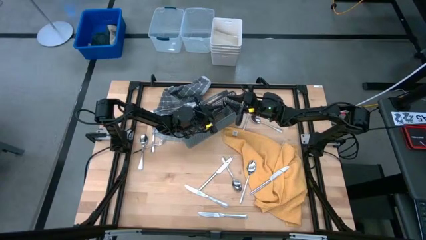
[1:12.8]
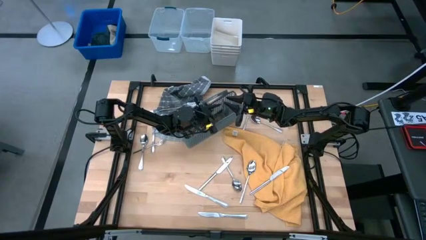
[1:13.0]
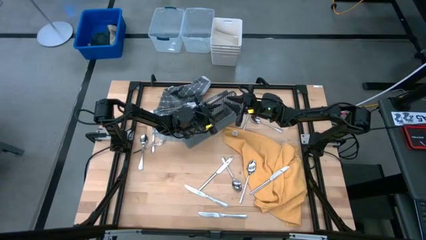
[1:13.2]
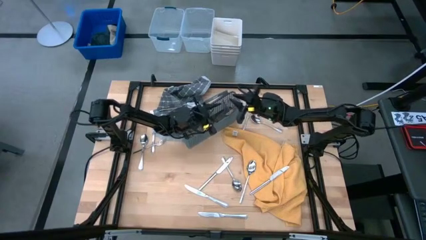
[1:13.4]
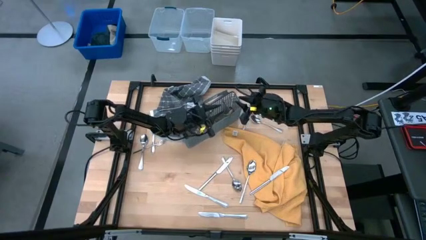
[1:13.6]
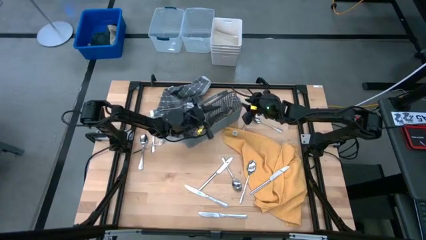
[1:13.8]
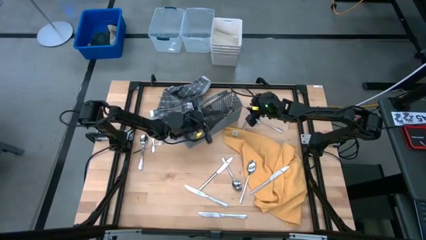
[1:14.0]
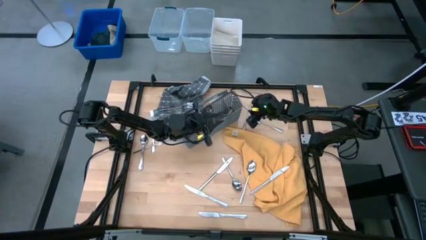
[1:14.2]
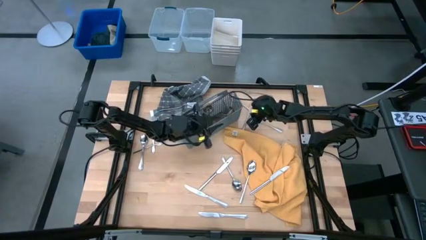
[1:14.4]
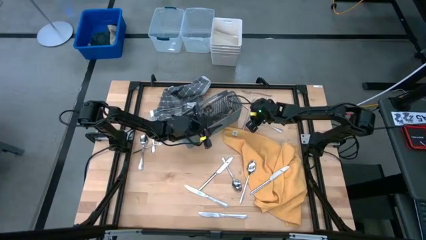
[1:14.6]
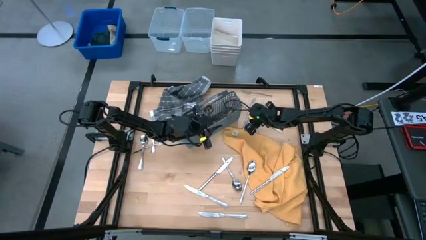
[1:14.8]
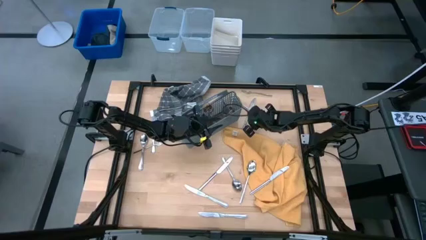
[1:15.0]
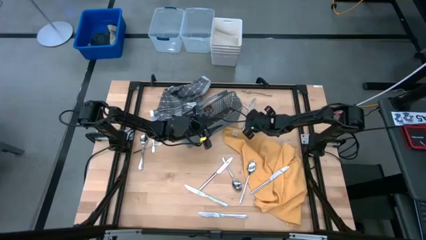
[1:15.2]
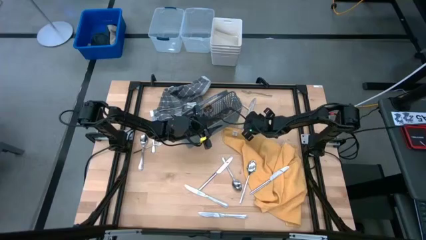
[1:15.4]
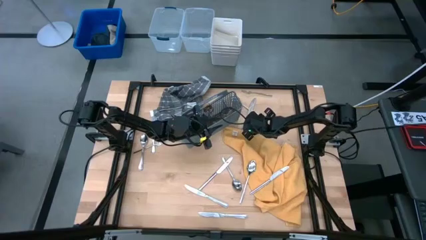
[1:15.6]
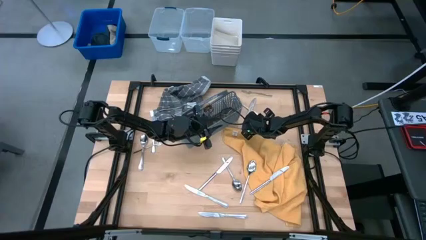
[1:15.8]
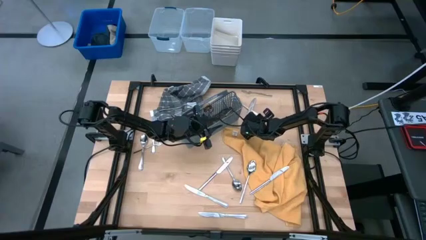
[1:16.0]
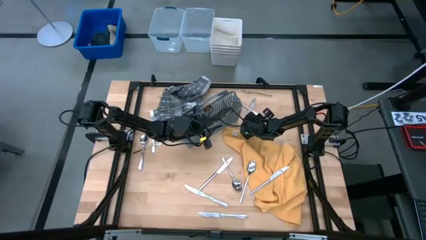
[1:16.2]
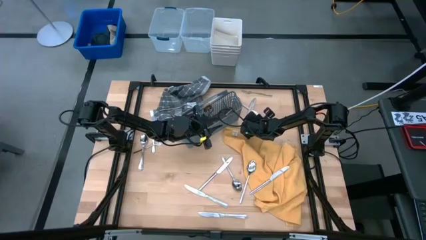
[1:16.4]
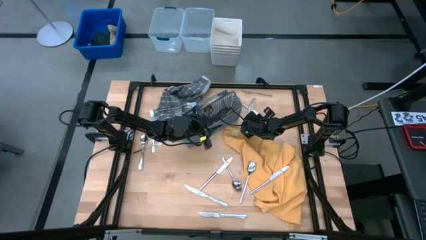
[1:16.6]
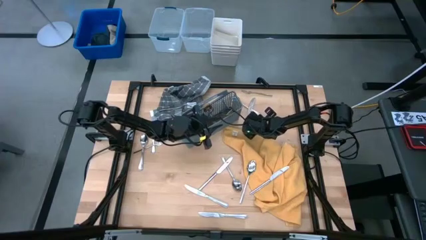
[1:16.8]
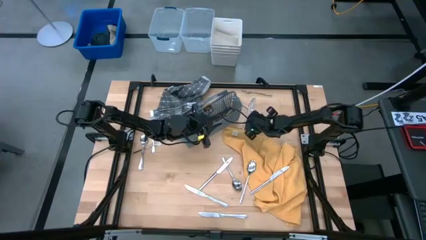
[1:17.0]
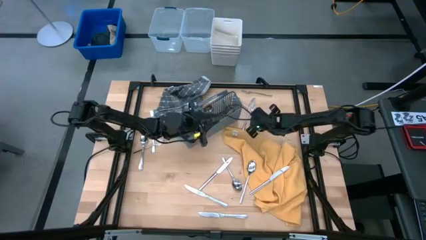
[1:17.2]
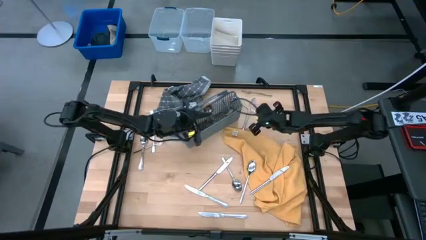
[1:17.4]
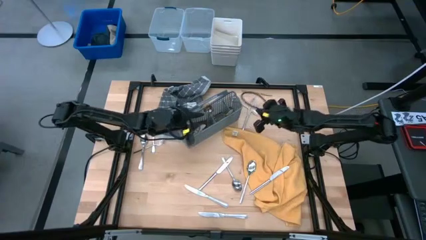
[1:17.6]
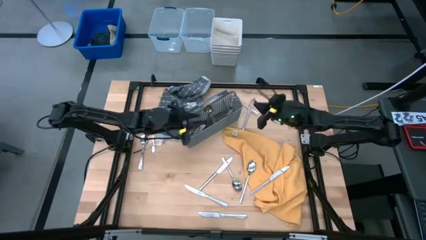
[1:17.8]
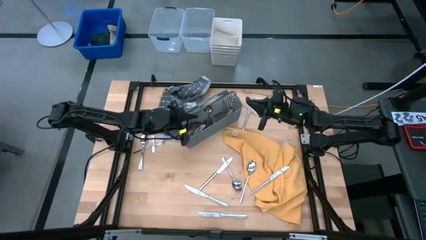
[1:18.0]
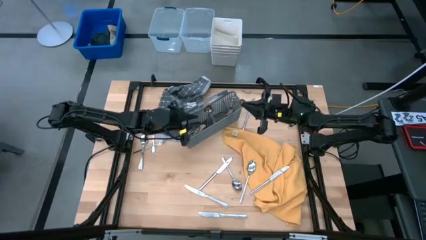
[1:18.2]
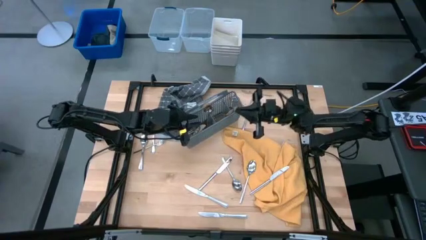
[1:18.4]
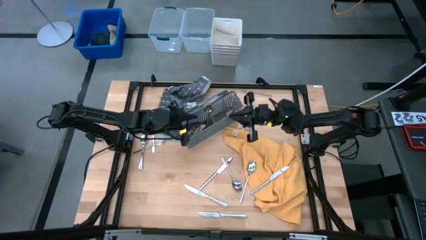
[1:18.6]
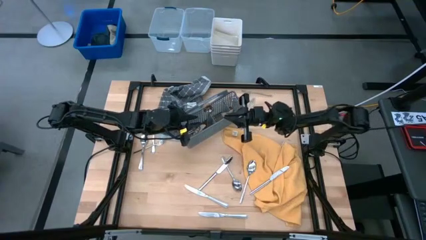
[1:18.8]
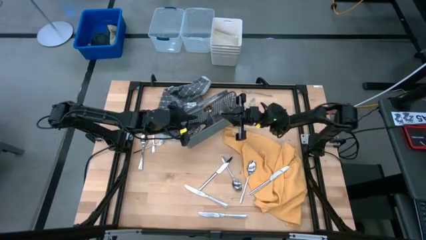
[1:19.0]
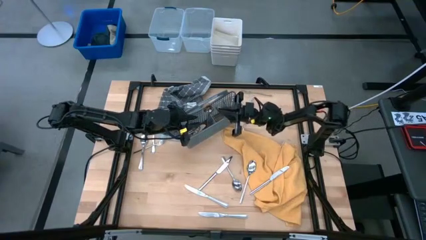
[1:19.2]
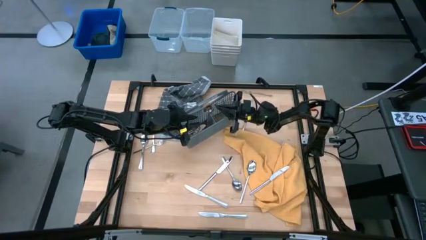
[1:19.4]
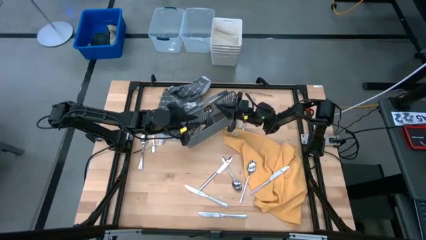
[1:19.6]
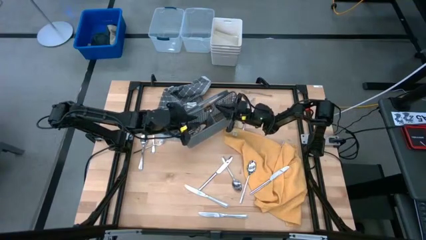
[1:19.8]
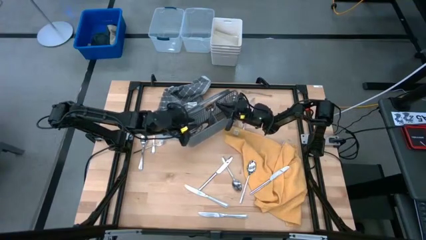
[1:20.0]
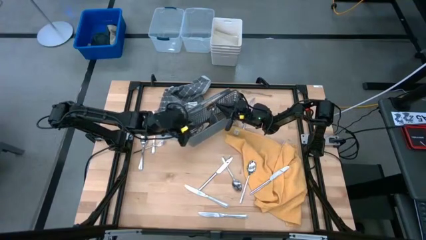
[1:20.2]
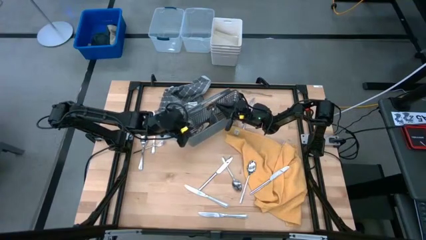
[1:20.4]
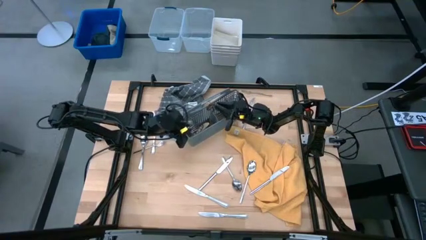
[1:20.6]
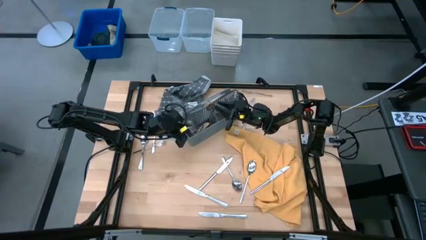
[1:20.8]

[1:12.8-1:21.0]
Task: Sort silverware
Put the silver spoon into the gray silverware basket

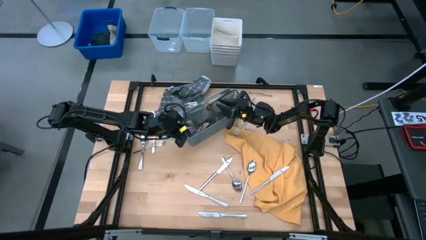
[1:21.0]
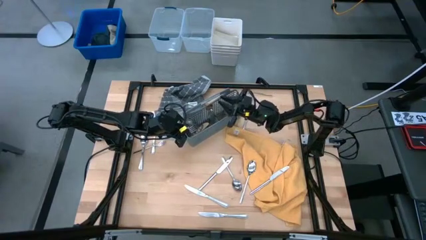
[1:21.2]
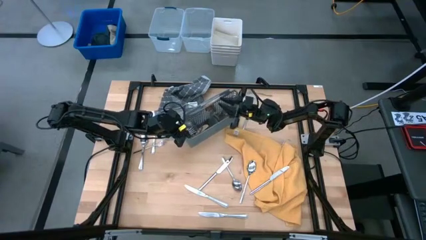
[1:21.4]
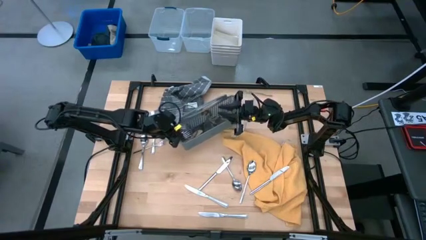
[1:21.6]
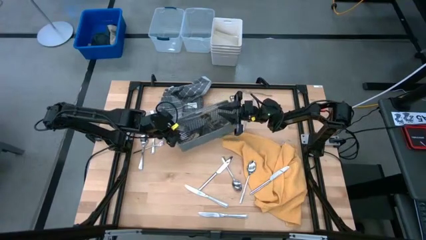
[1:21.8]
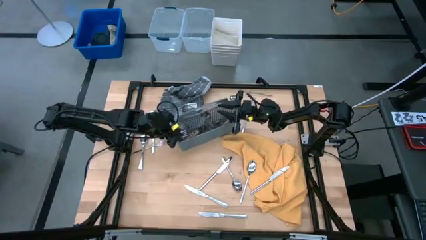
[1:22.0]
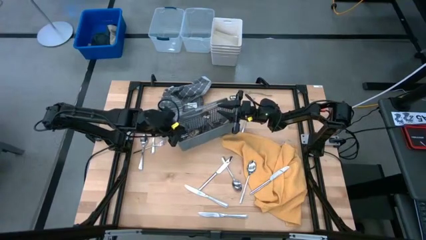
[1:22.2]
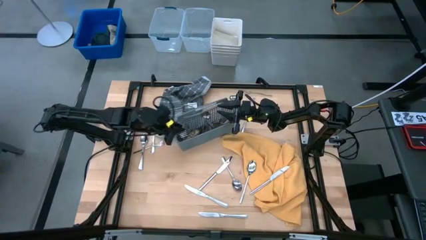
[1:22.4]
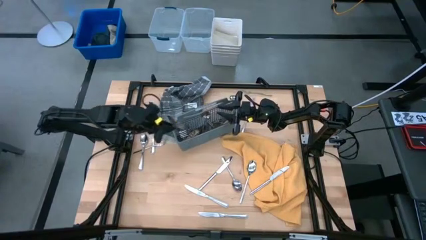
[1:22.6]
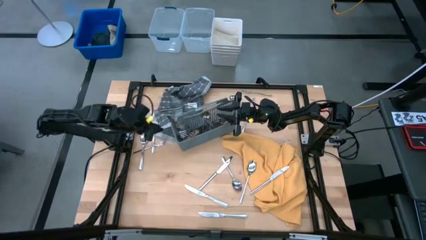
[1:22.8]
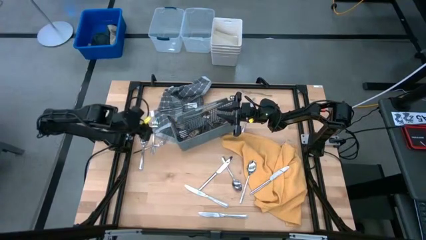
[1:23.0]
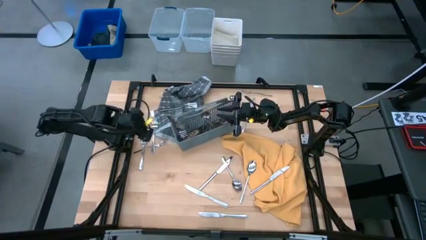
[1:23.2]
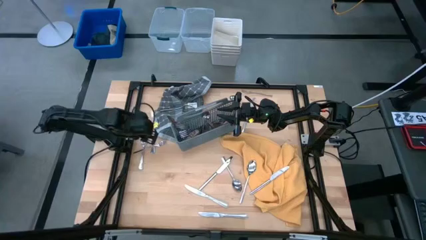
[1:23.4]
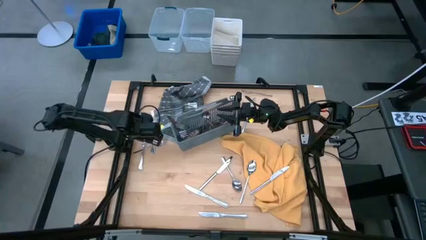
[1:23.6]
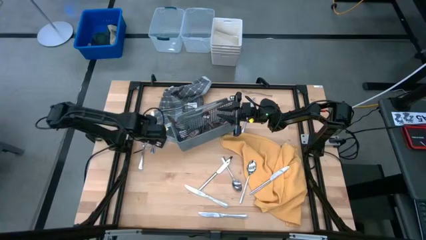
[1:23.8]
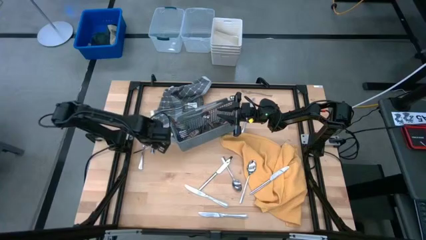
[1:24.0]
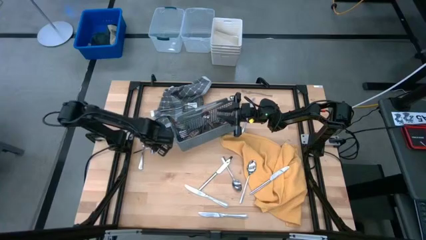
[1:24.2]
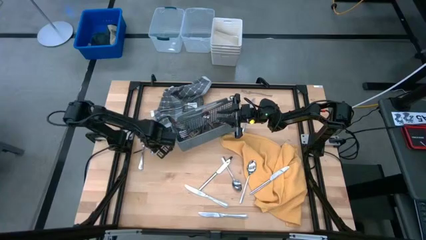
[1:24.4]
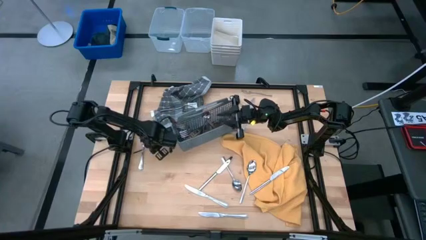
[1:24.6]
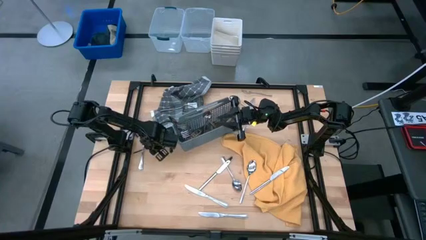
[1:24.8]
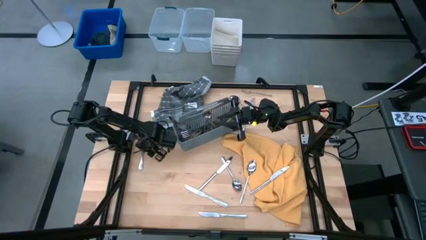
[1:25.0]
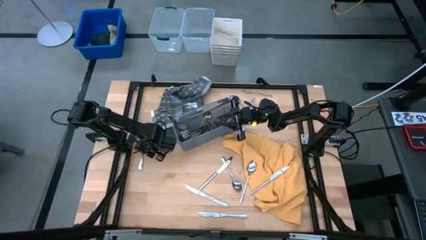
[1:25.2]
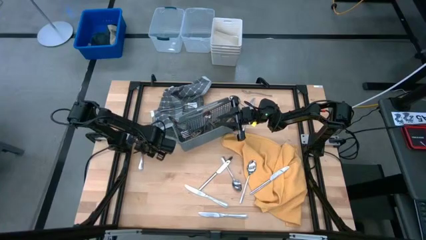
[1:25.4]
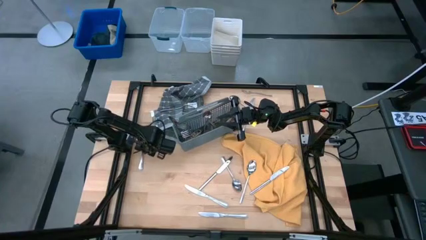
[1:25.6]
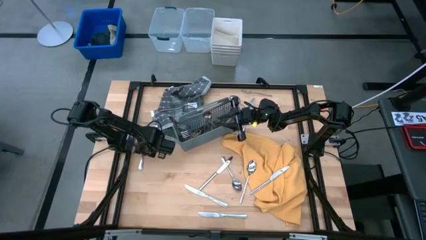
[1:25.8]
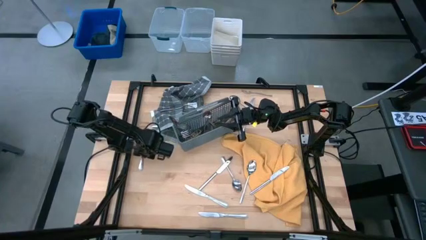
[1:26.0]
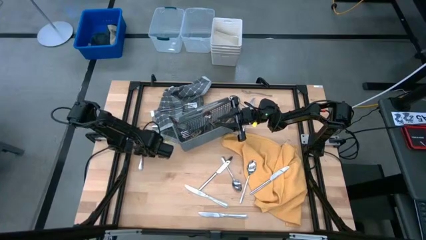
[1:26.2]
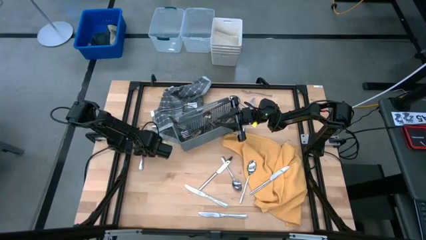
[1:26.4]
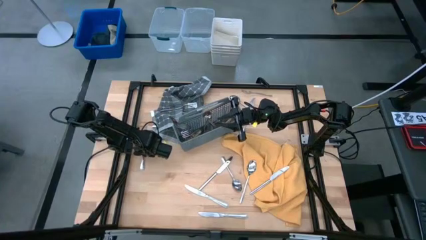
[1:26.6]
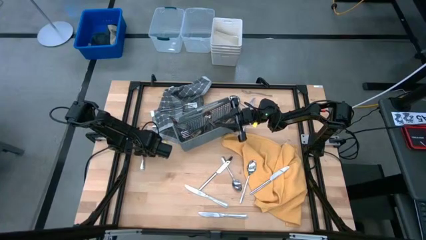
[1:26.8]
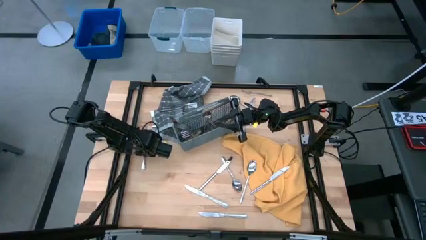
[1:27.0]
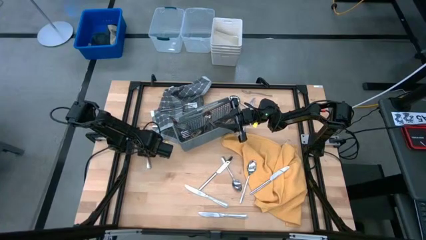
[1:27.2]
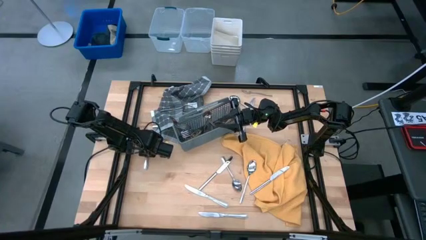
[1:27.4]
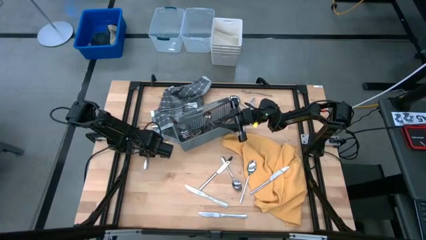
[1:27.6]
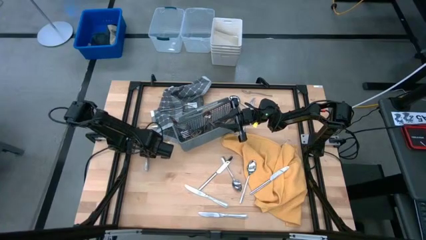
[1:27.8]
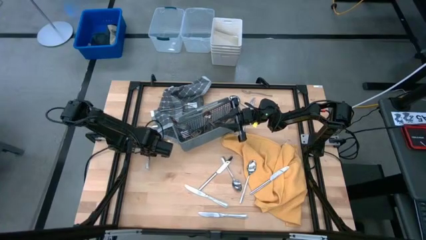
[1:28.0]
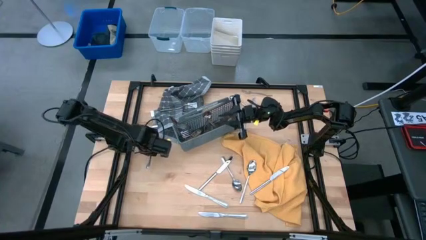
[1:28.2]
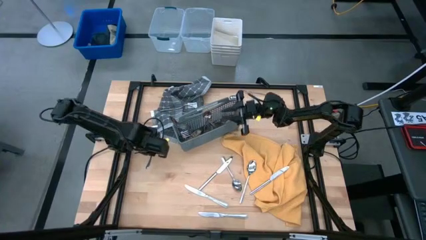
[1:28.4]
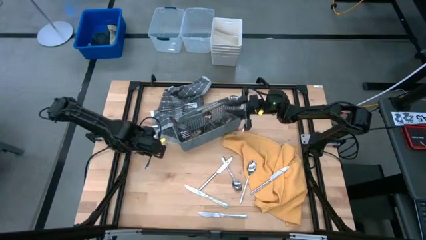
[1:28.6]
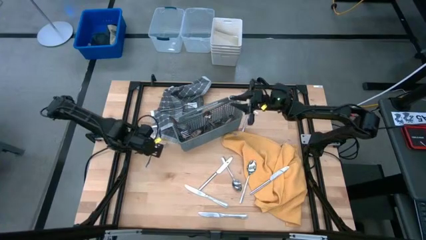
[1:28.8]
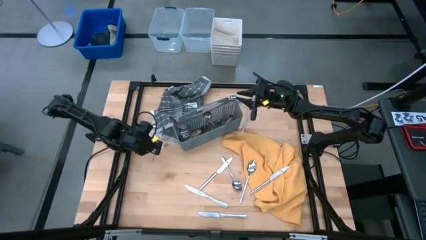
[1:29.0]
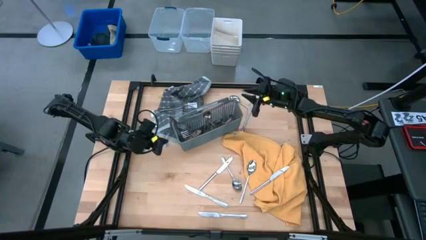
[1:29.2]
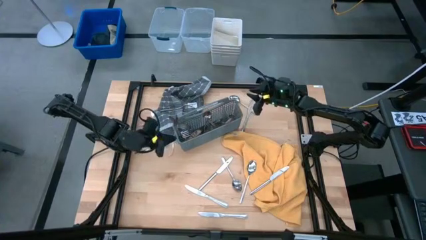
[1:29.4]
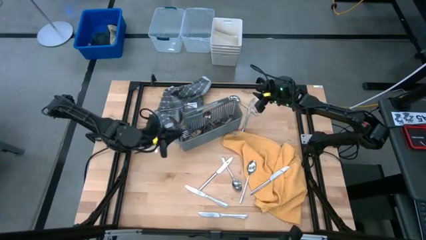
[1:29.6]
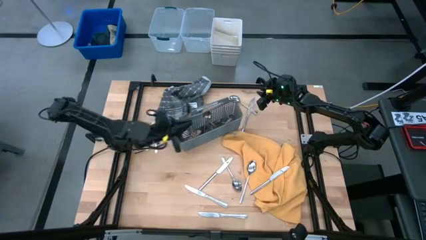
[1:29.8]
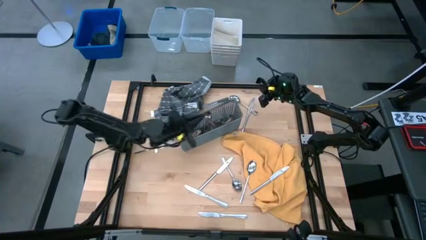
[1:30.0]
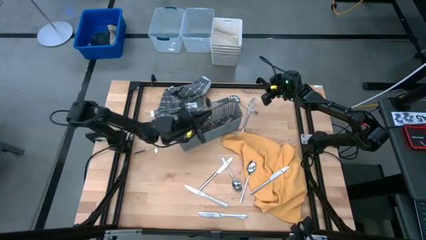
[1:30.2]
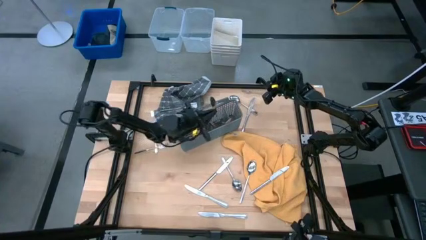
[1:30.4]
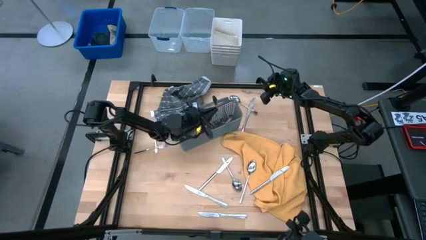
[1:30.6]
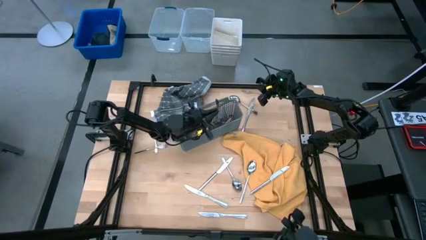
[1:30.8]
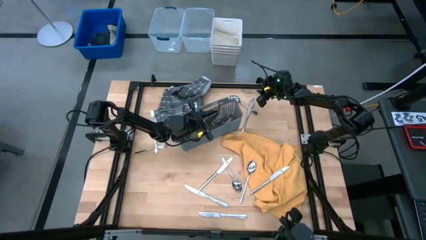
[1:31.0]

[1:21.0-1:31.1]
Put the silver spoon into the gray silverware basket
